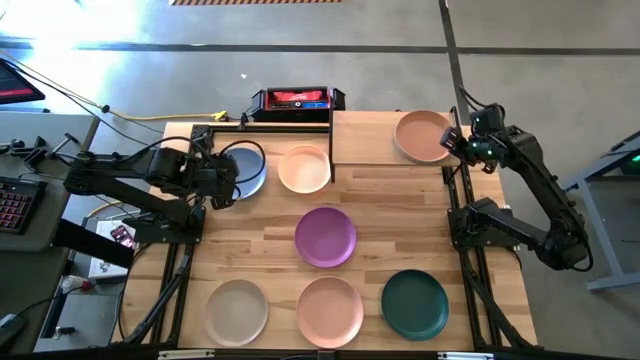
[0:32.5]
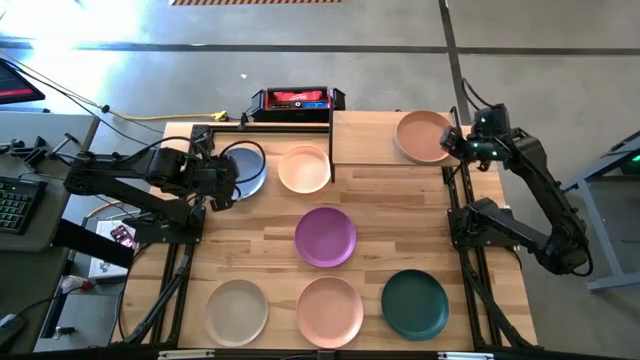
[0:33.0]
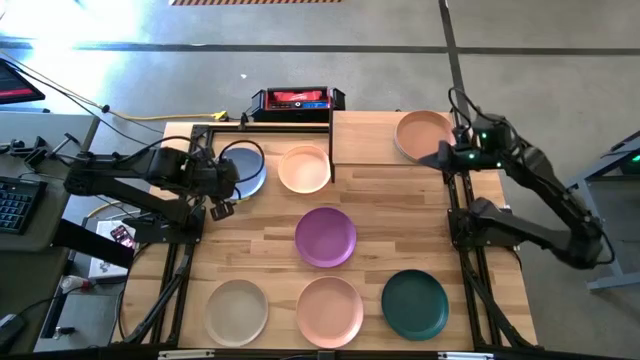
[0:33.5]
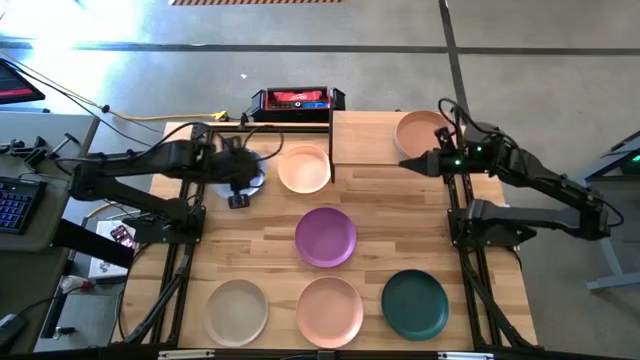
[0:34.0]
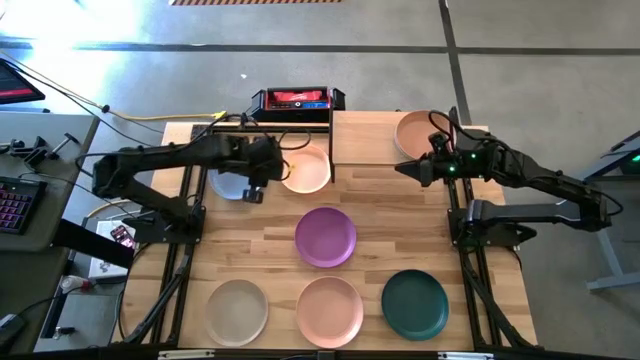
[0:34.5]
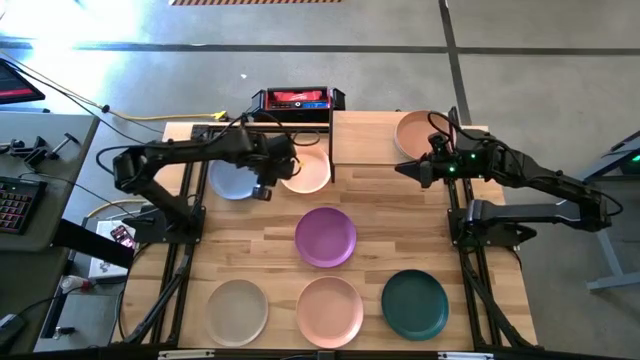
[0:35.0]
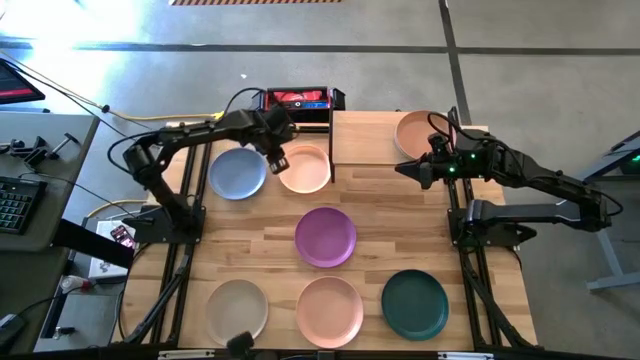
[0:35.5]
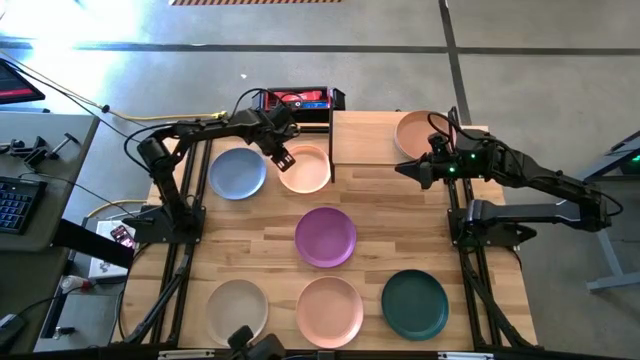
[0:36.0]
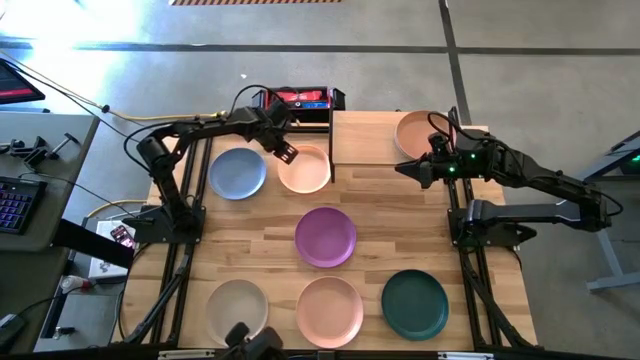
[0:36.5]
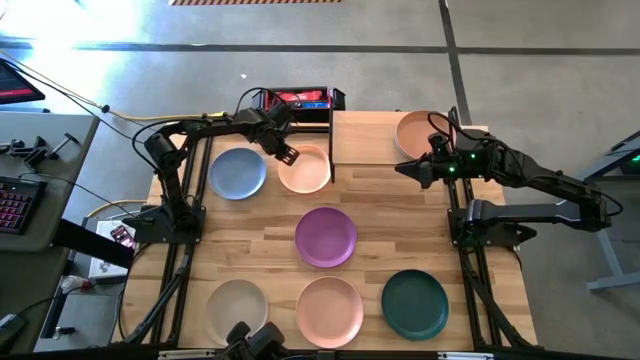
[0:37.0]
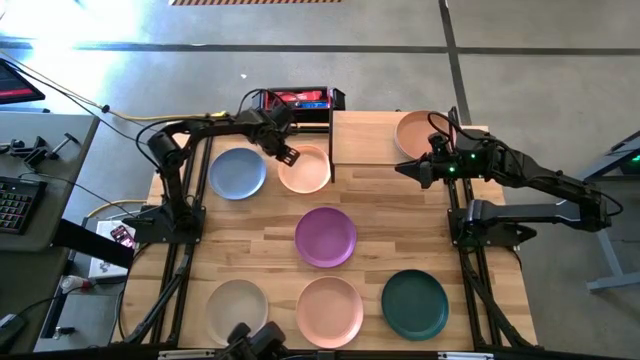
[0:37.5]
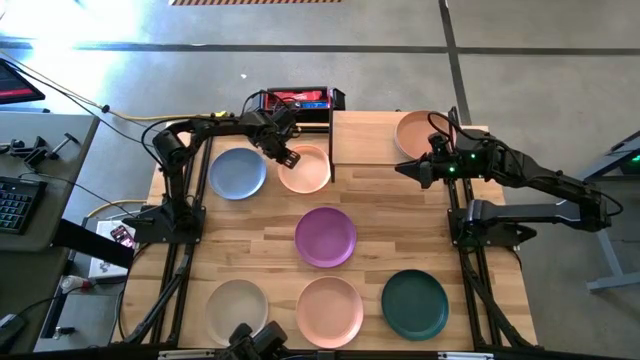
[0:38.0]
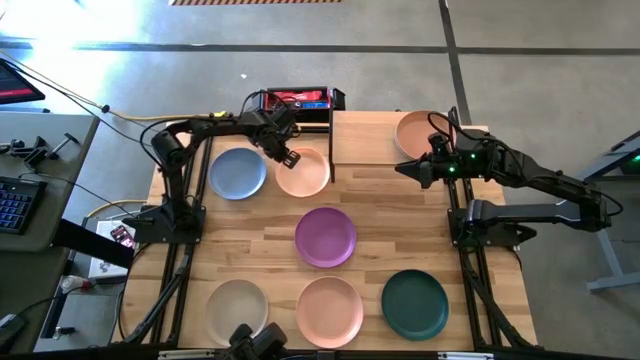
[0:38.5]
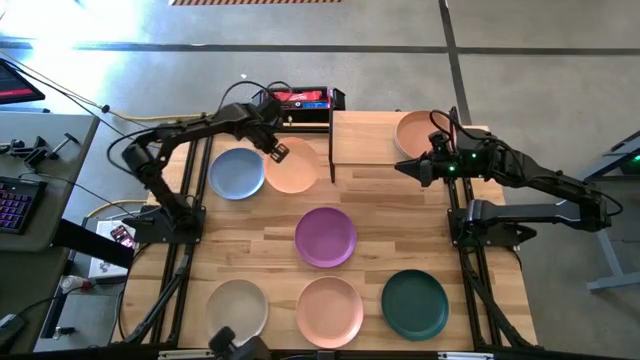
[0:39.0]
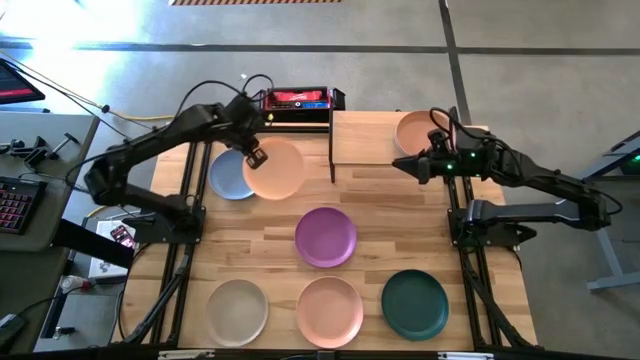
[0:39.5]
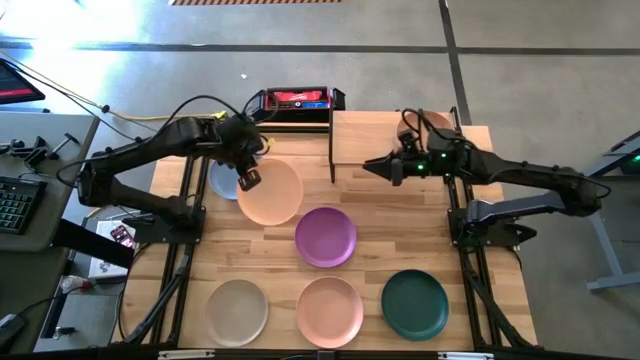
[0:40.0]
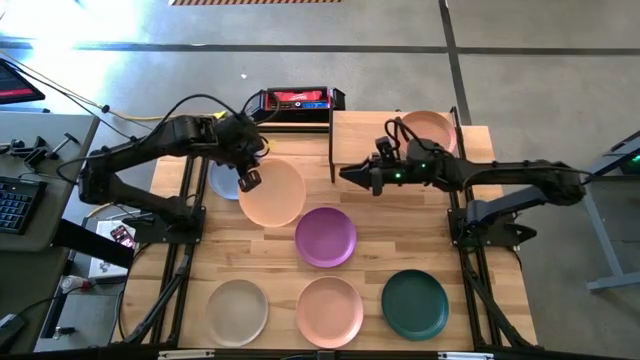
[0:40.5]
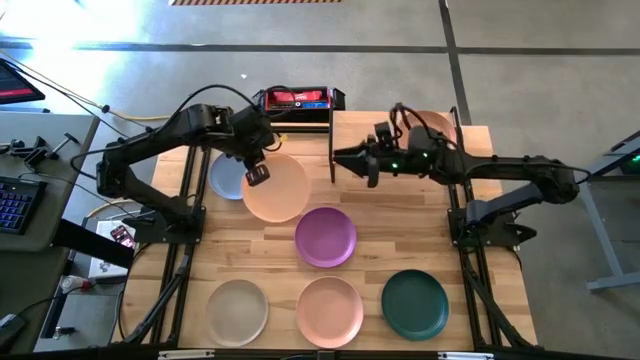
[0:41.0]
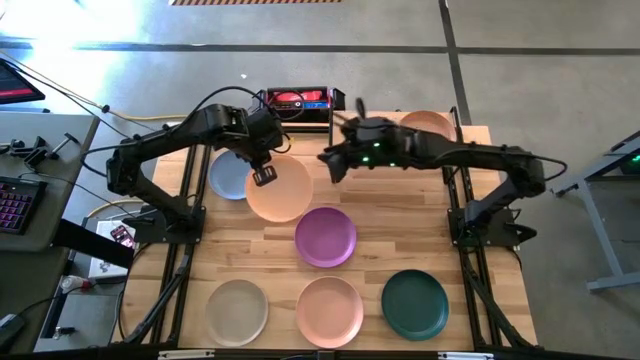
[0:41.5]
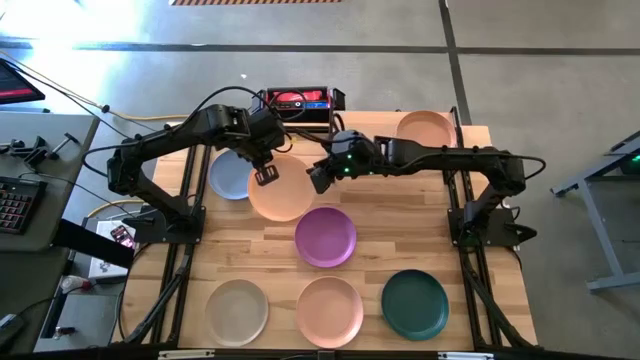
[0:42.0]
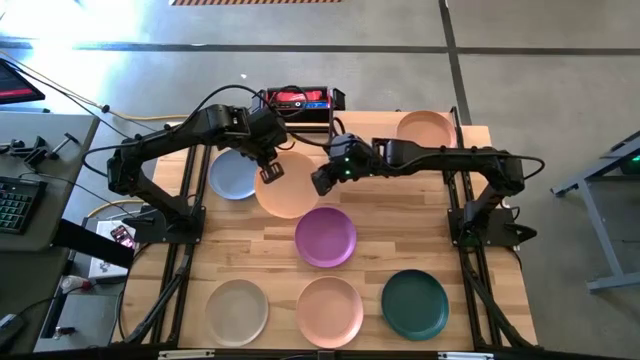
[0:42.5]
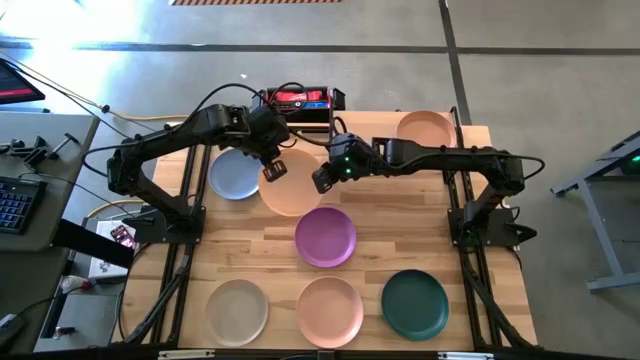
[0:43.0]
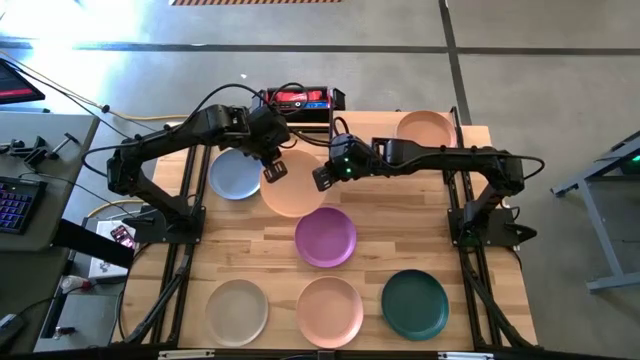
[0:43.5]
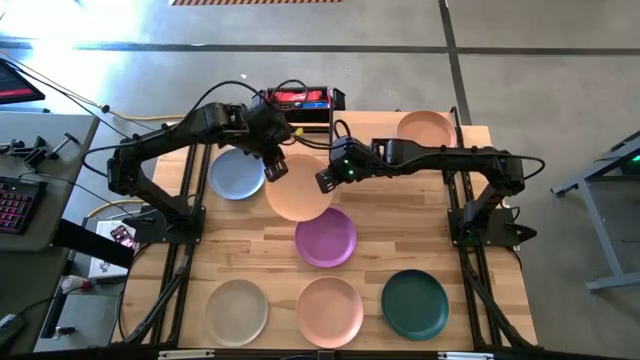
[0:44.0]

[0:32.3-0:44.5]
Task: Place and stack plates onto a shelf
Stack the orange plate on top of the brown plate on the shelf

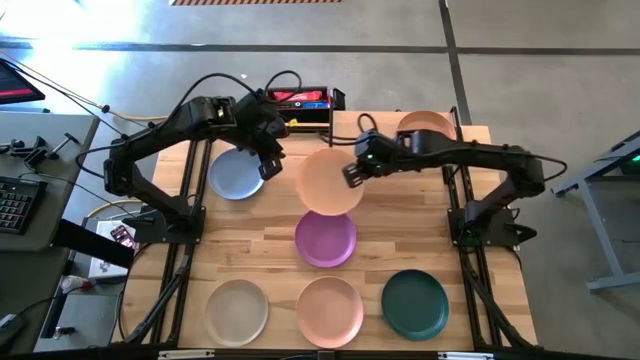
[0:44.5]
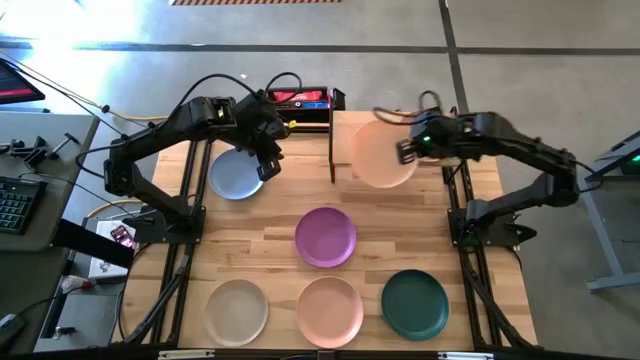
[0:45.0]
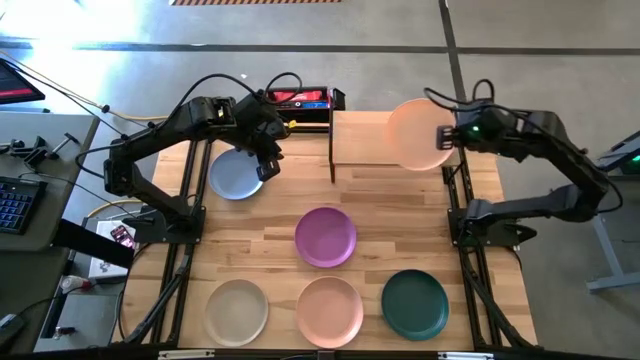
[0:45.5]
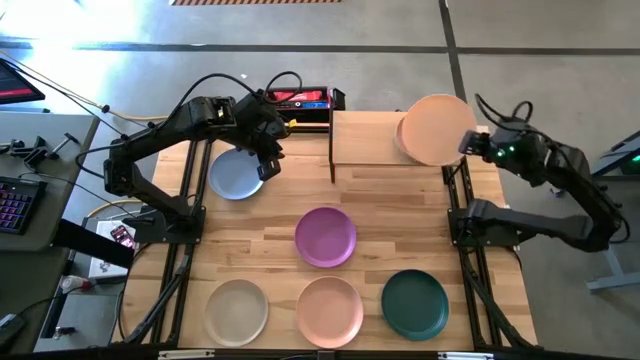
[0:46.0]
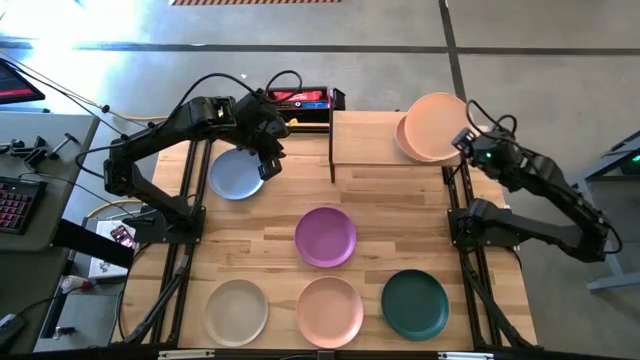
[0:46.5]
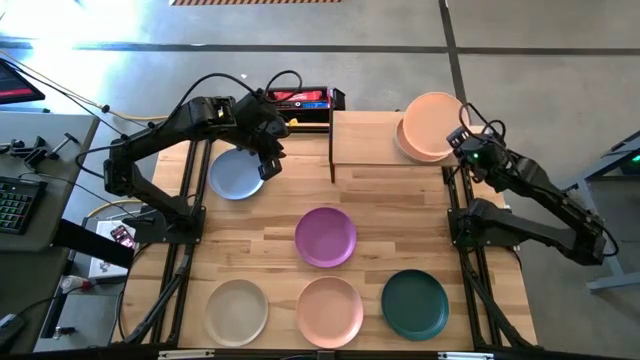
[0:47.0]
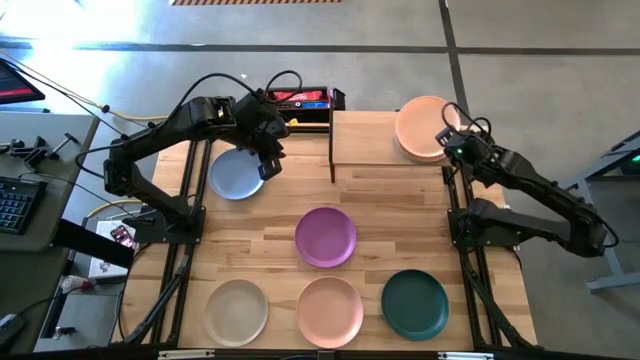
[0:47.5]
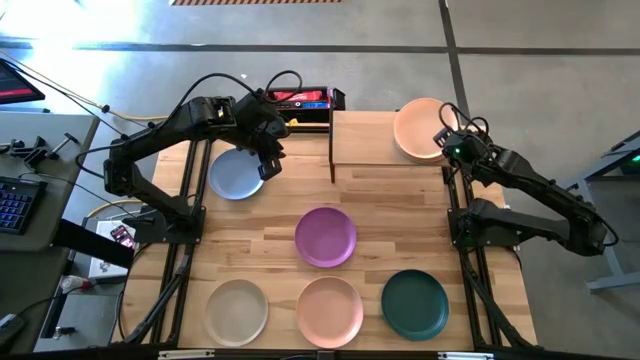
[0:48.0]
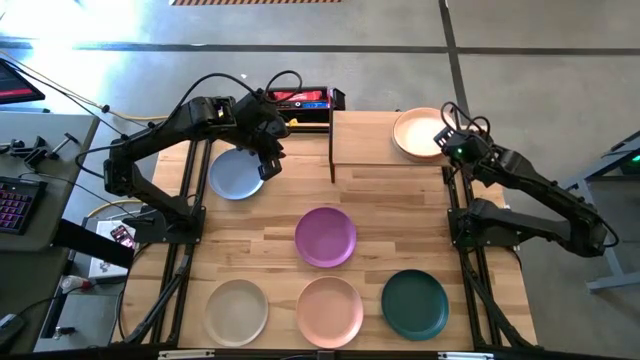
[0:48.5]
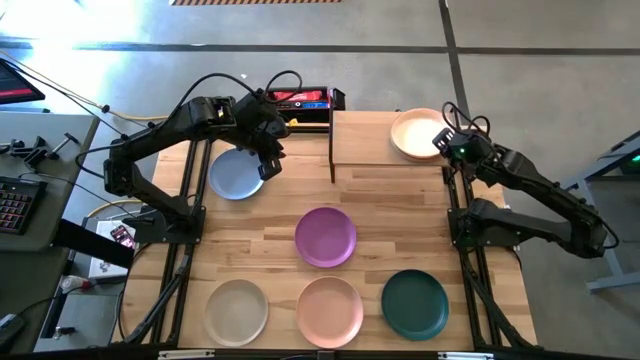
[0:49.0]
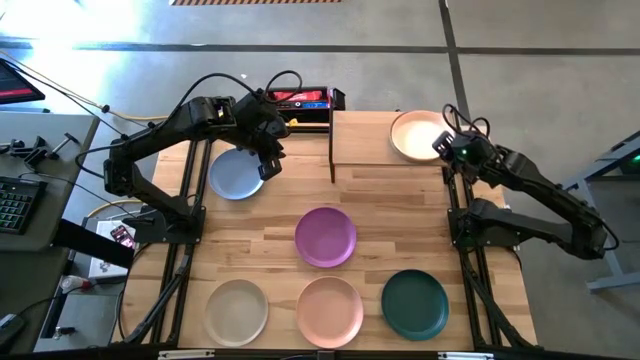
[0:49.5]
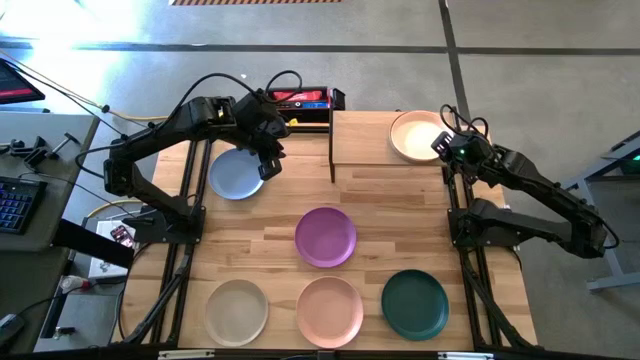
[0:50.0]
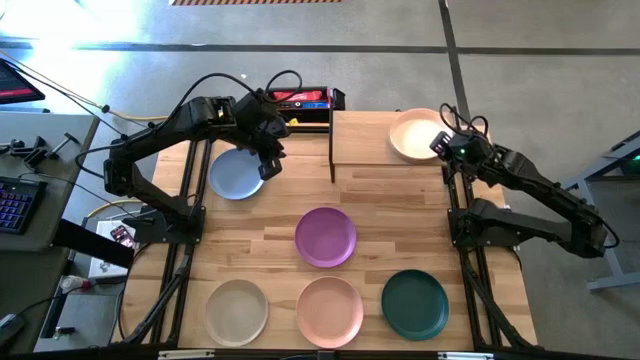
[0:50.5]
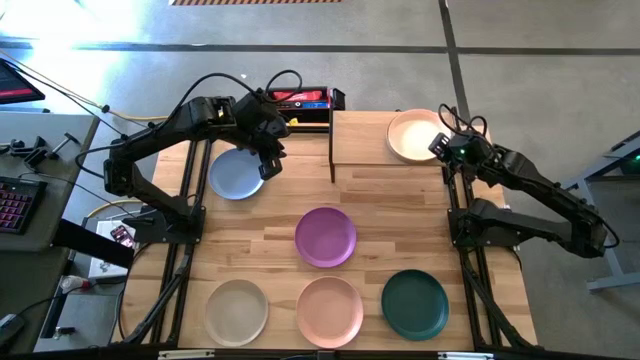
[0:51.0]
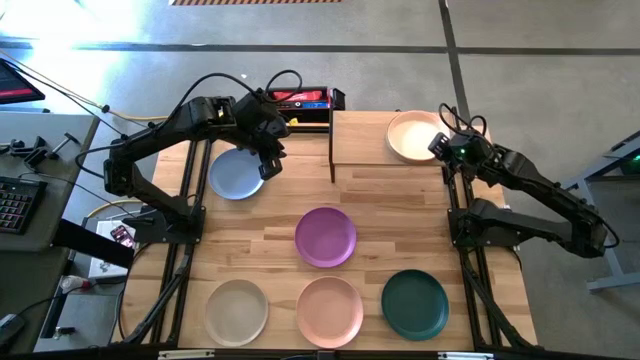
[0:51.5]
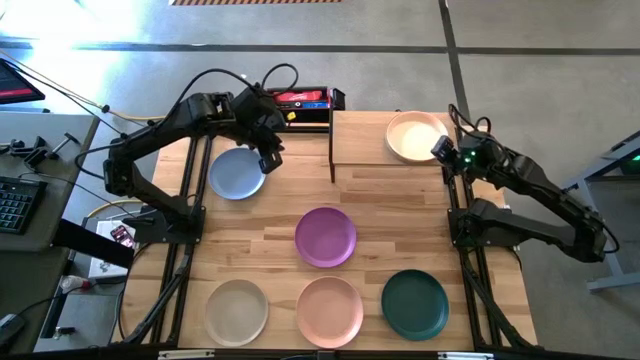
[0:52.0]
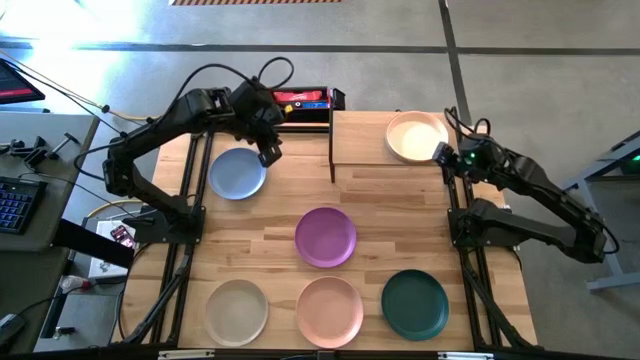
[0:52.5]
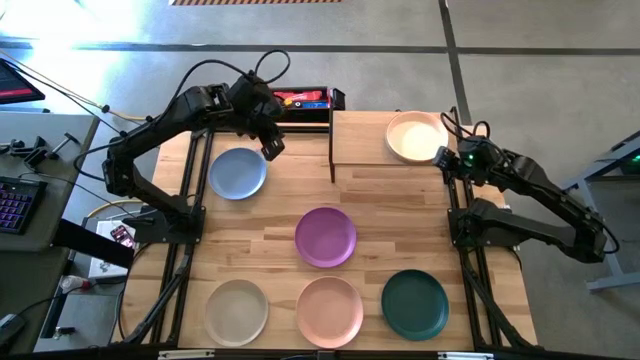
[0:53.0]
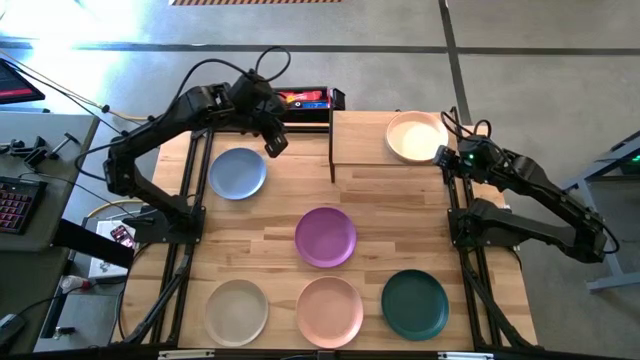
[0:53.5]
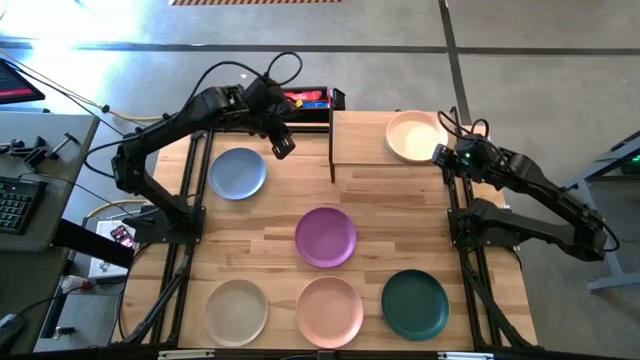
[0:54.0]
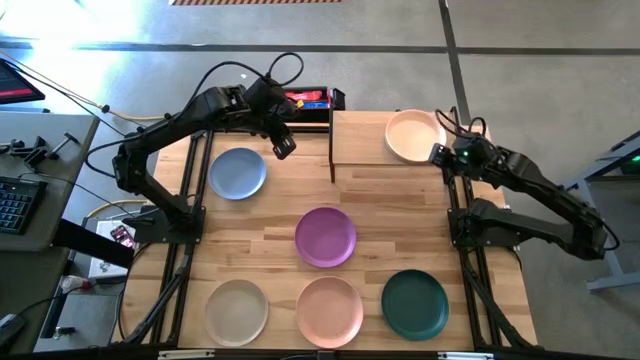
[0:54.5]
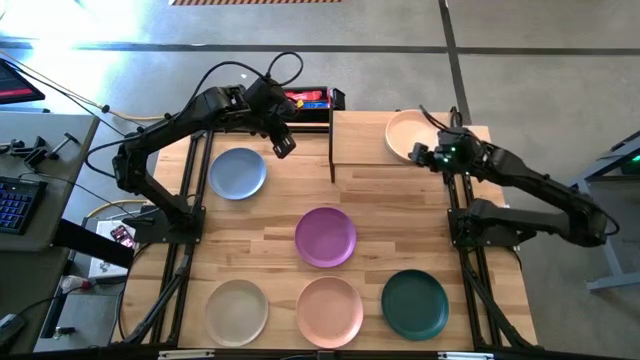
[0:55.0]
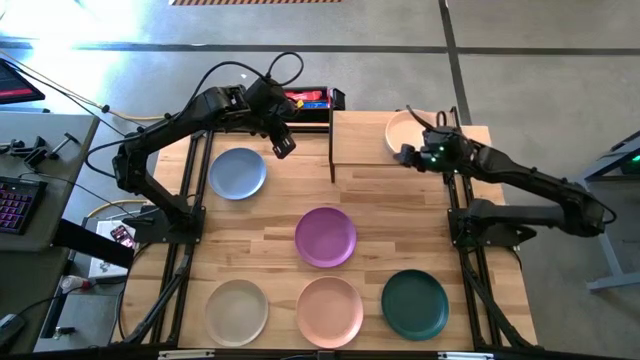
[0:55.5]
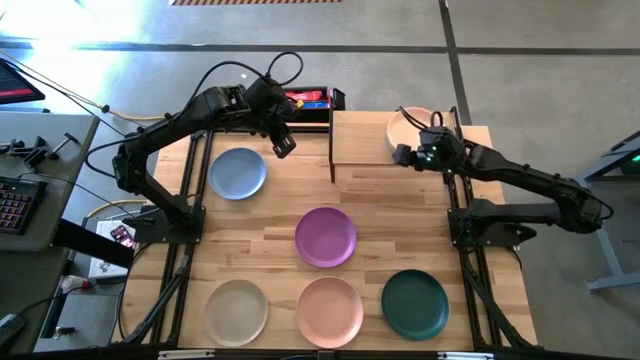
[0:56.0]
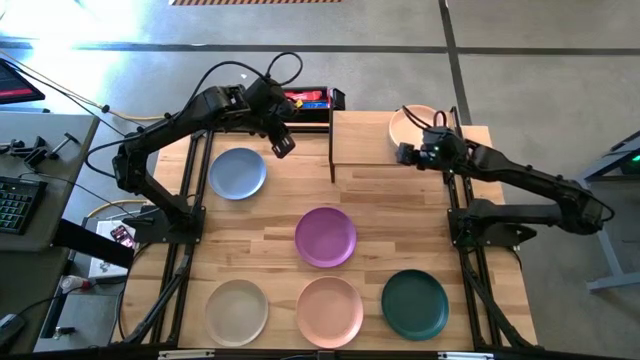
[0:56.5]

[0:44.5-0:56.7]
Stack the orange plate on top of the brown plate on the shelf
